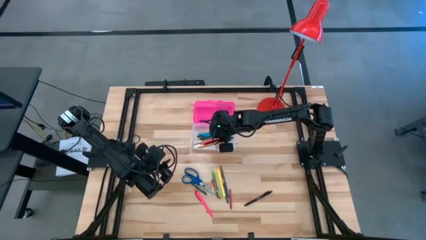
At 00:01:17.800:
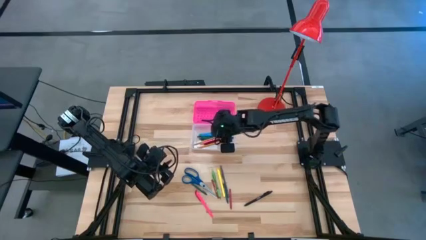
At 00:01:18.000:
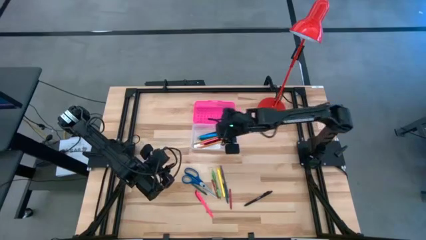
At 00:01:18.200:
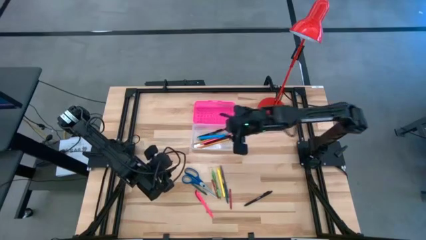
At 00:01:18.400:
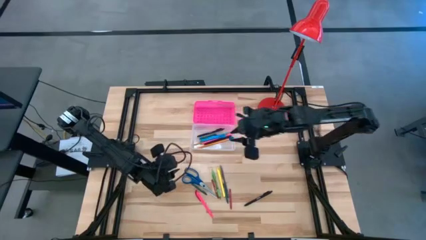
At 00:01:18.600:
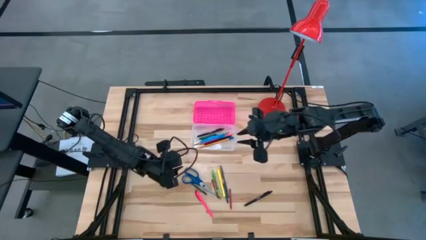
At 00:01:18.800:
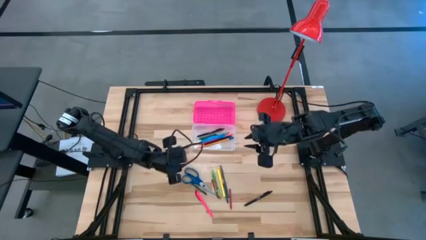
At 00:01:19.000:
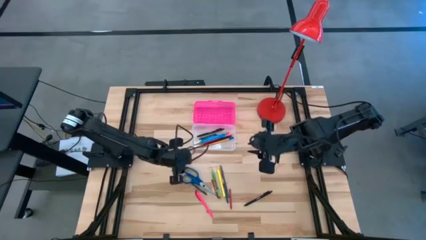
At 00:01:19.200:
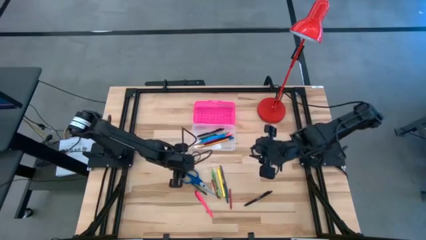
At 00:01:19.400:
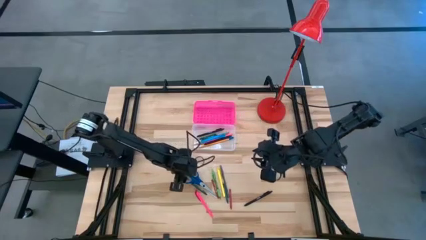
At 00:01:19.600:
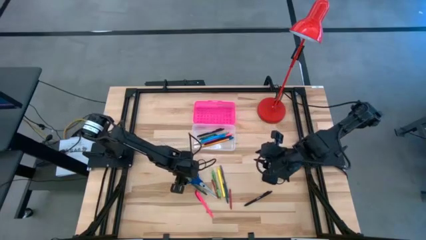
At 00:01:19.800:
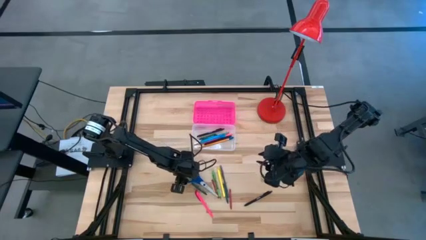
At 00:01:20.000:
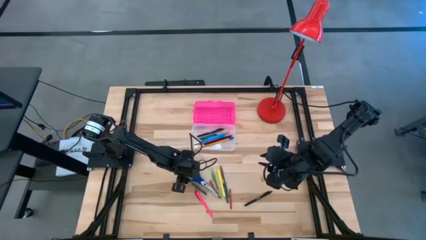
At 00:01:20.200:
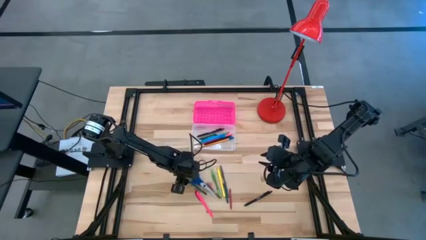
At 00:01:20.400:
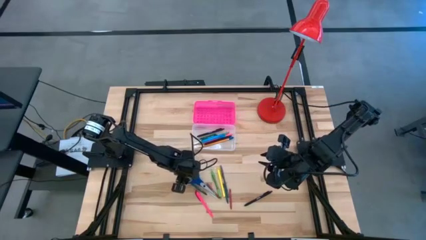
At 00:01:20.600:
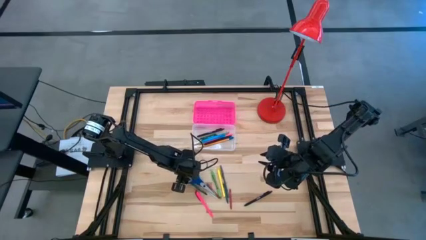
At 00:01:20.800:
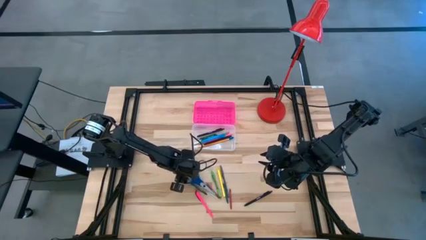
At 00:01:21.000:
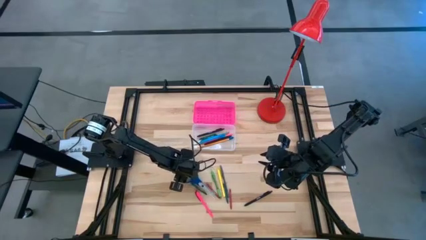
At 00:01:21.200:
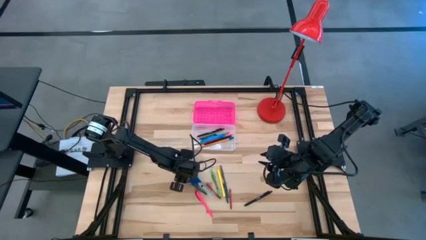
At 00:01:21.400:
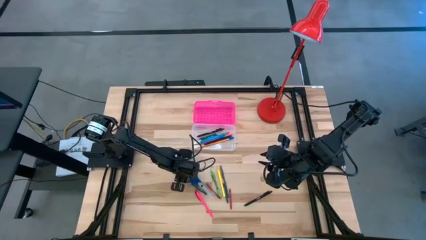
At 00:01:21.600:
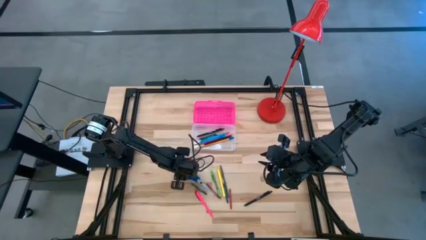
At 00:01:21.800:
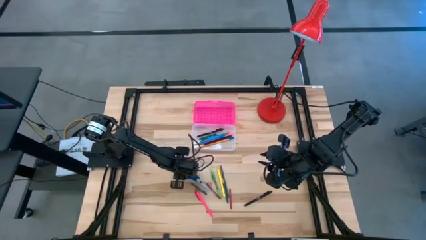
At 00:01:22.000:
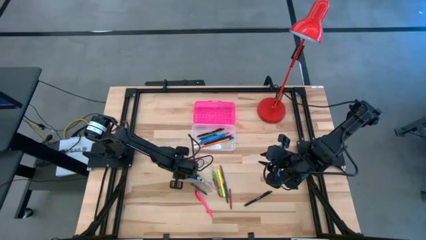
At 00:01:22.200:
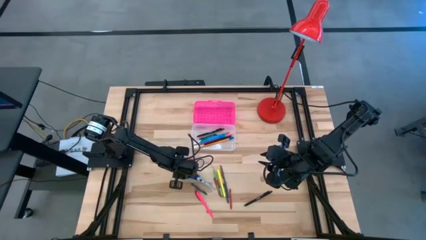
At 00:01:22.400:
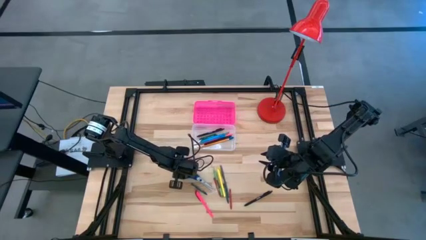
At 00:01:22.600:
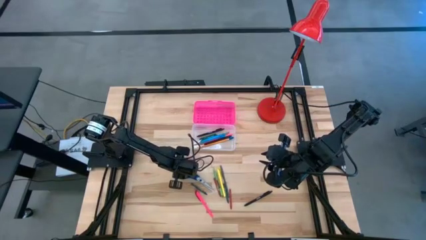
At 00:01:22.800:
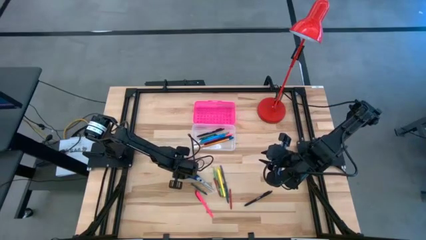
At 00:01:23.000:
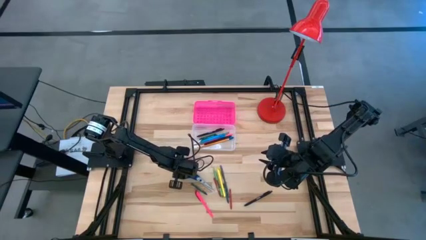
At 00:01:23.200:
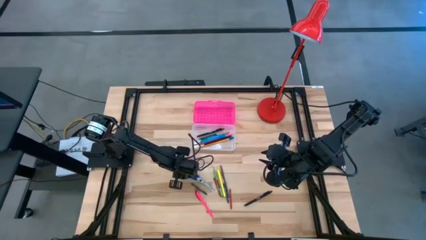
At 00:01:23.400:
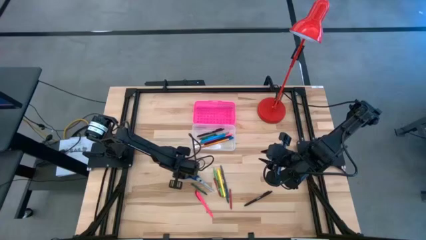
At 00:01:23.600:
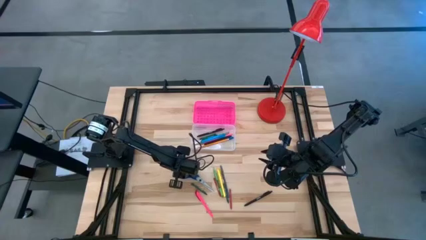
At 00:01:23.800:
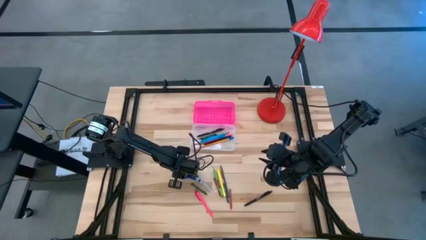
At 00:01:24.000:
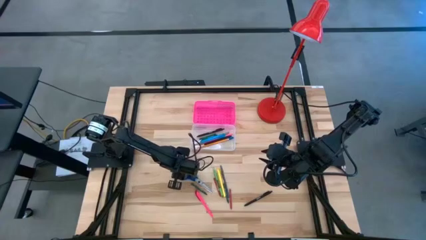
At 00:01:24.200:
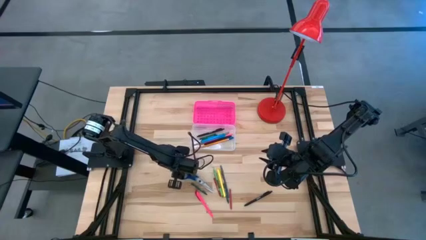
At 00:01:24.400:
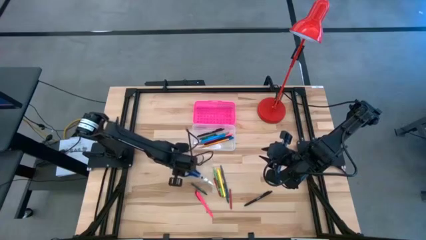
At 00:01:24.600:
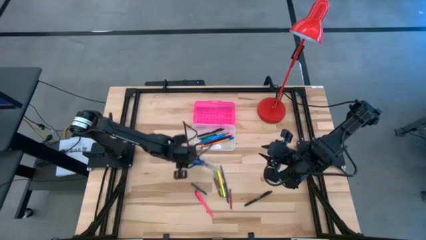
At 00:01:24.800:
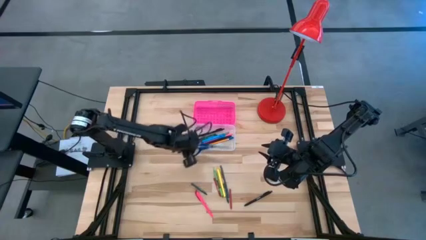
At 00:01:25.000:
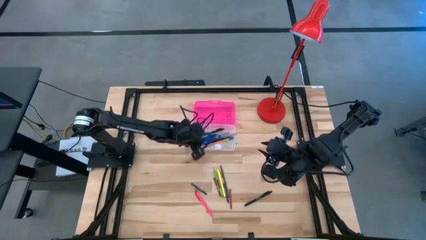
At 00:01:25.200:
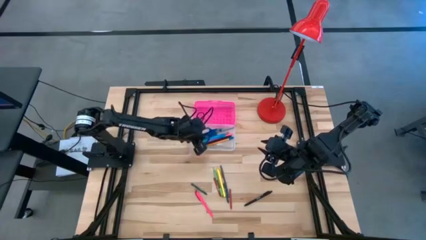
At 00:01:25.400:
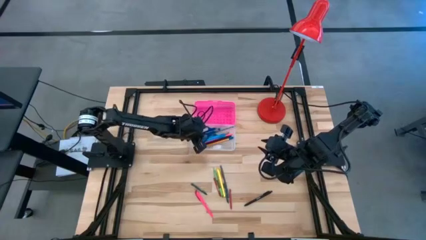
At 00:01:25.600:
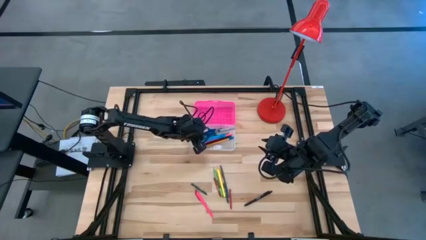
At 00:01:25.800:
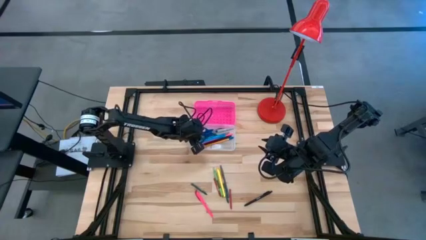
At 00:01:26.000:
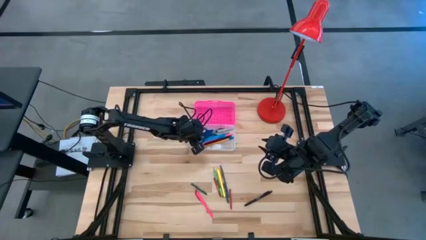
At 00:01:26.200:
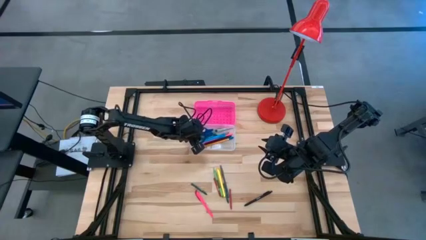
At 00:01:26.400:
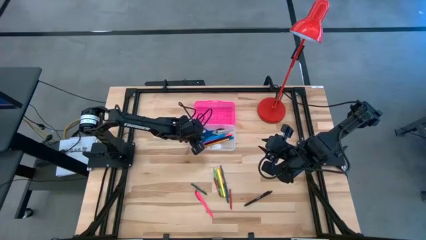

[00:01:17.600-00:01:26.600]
Task: Pick & place school supplies into a supply box
Put the blue scissors into the pink supply box

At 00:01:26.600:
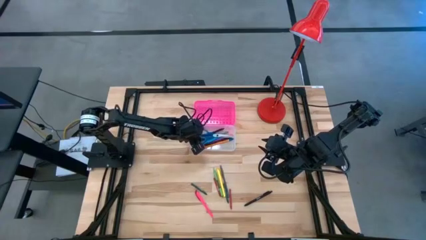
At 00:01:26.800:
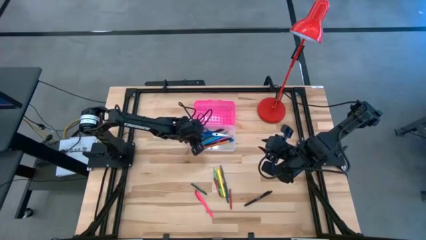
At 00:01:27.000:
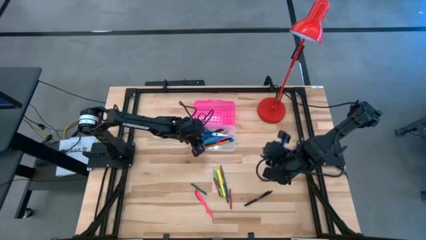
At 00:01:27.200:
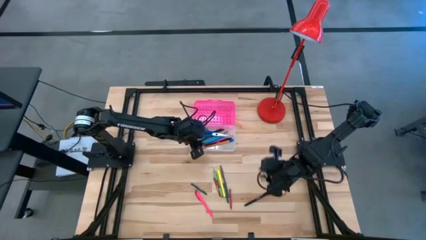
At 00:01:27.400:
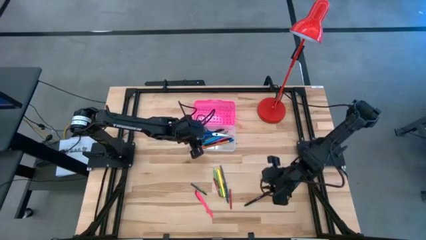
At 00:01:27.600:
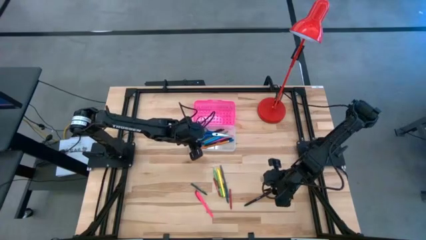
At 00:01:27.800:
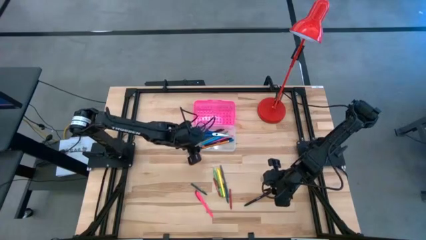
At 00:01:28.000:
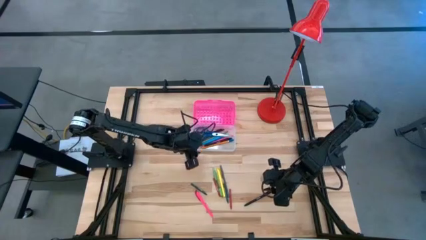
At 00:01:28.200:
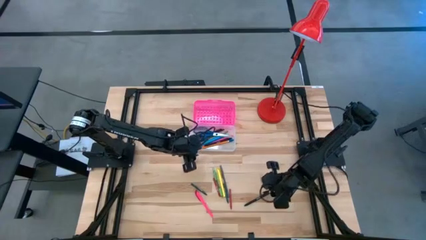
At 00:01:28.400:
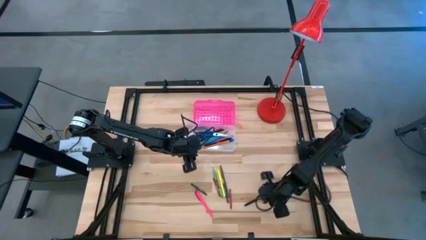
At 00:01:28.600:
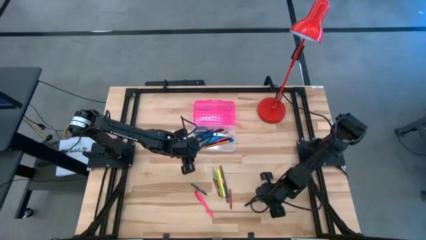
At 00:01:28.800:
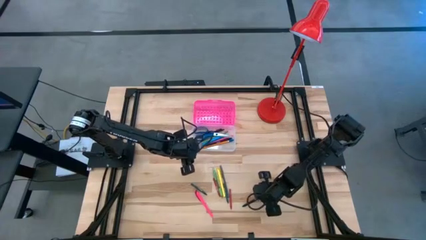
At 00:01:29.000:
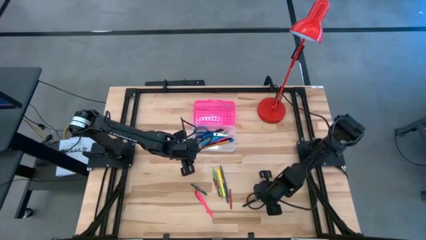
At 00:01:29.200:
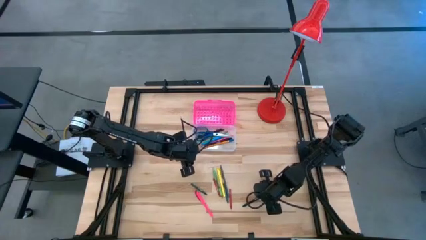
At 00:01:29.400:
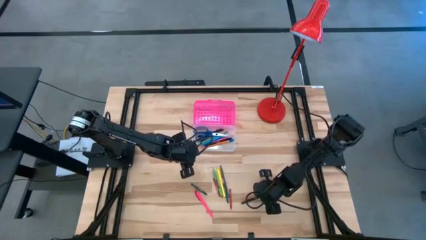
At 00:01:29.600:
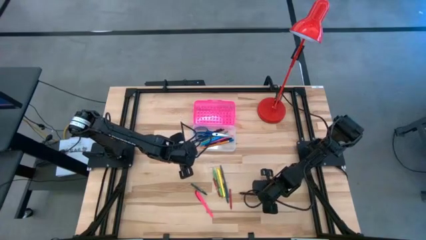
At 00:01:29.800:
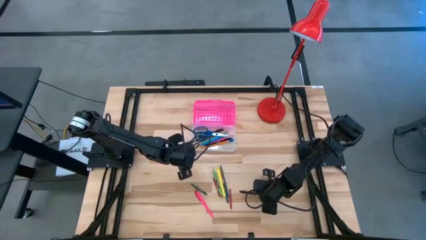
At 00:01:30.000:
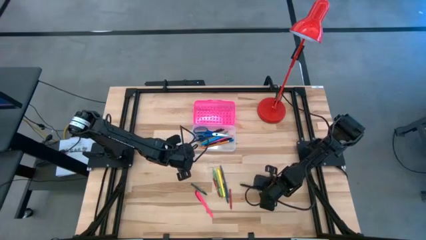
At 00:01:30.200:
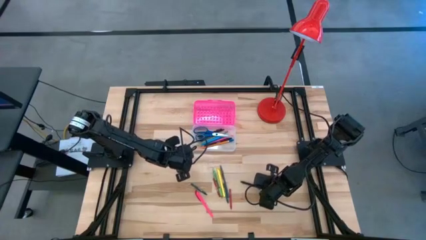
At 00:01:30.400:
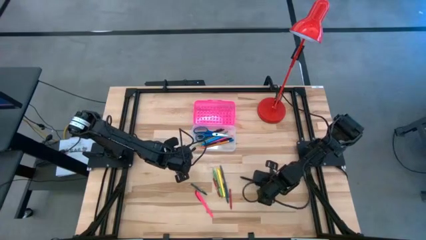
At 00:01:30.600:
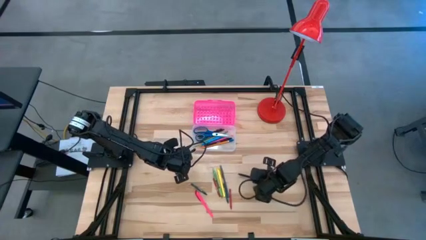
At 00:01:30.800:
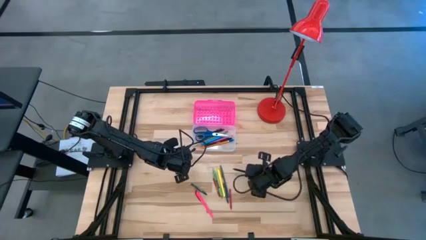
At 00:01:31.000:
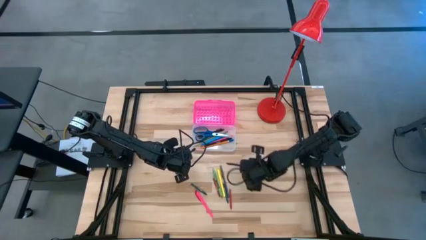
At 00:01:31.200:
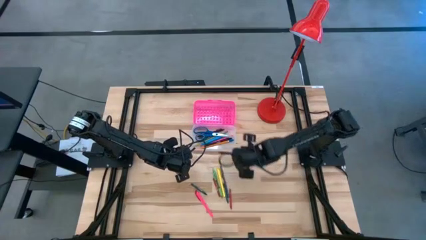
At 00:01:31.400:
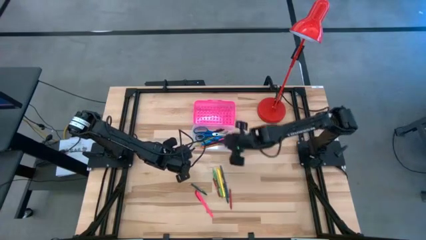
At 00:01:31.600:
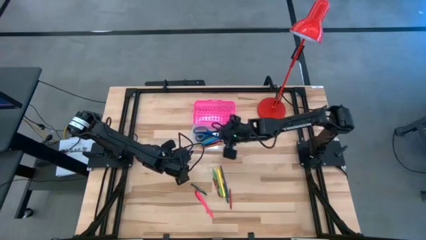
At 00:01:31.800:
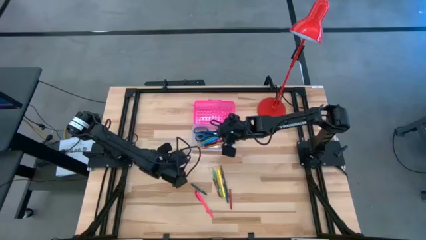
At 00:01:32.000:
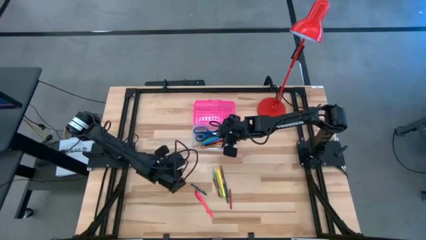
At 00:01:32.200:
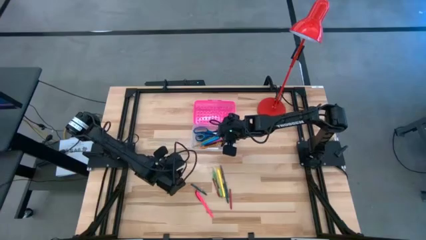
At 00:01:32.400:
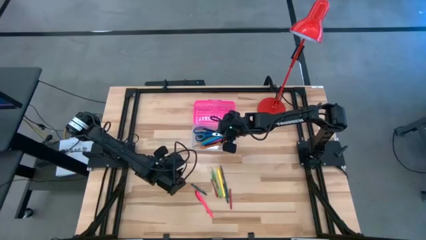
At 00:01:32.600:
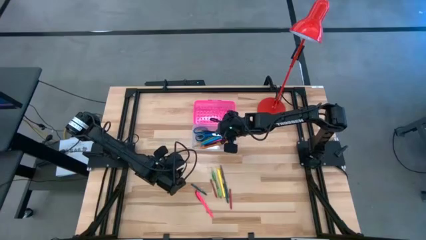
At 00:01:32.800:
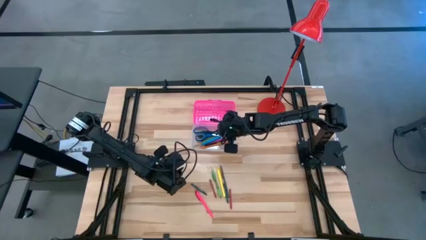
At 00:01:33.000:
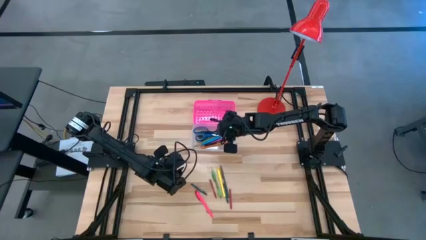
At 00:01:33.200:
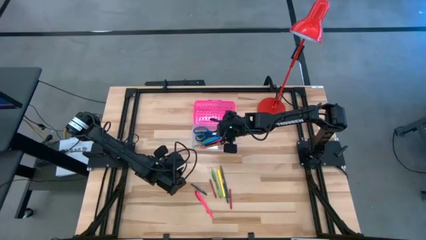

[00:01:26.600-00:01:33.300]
Put the black pen into the pink supply box
